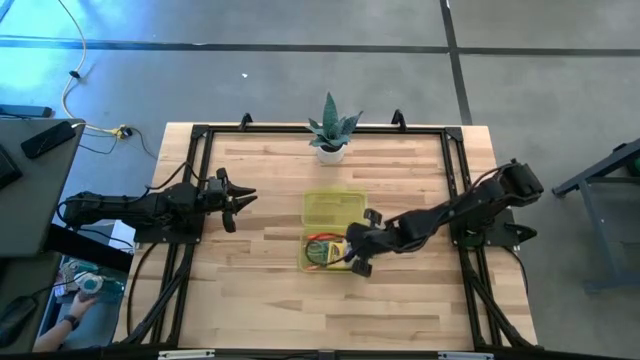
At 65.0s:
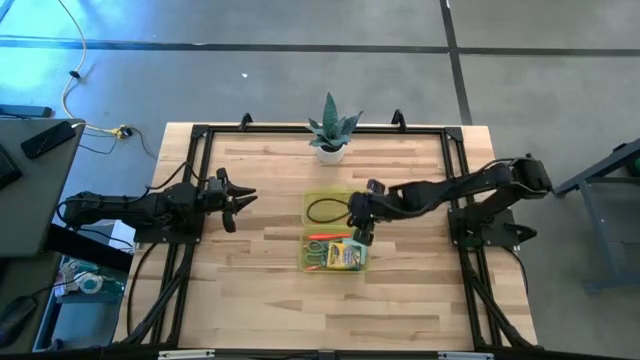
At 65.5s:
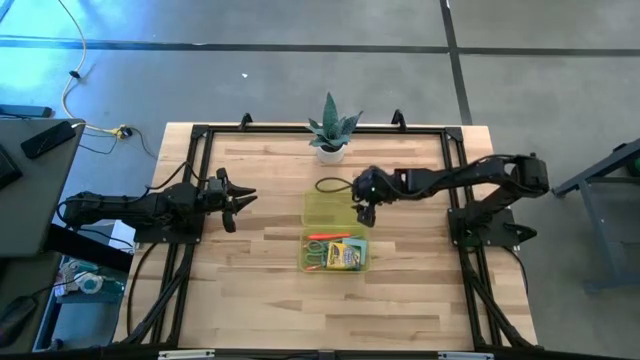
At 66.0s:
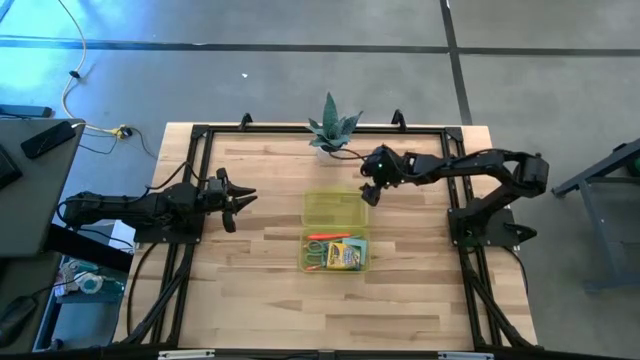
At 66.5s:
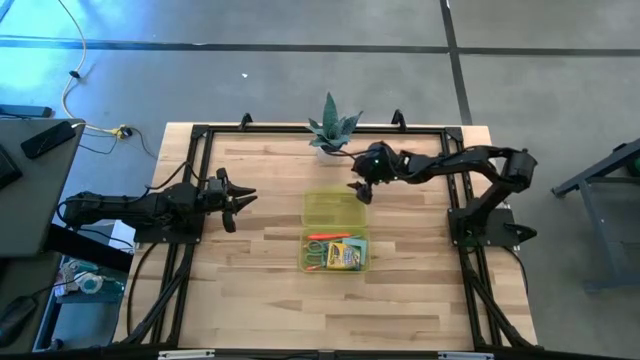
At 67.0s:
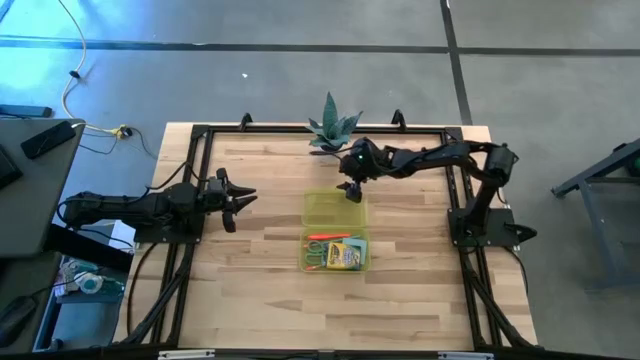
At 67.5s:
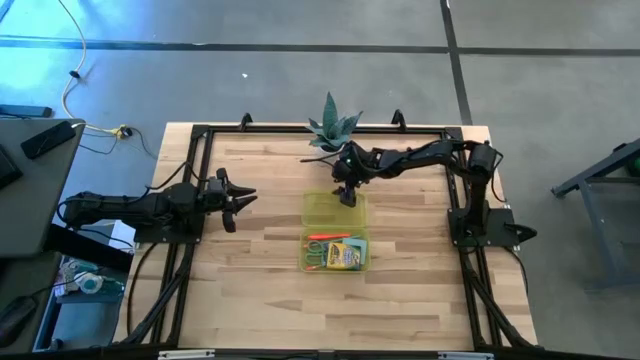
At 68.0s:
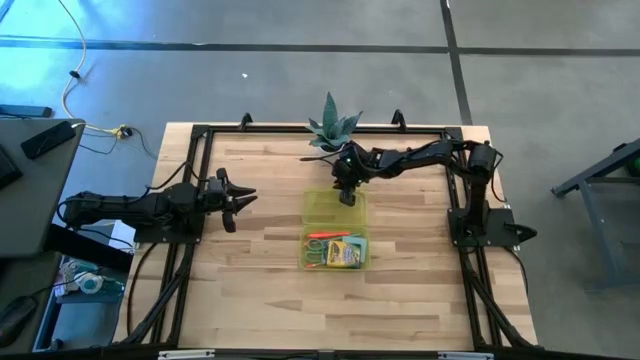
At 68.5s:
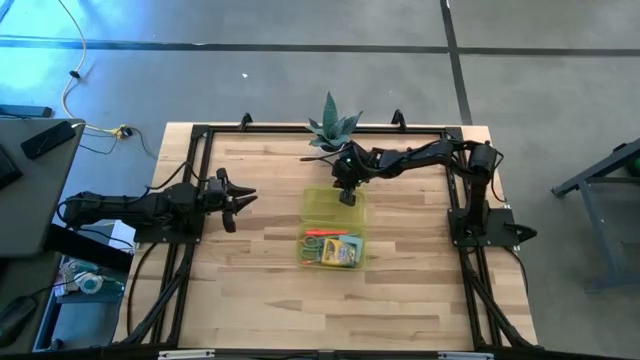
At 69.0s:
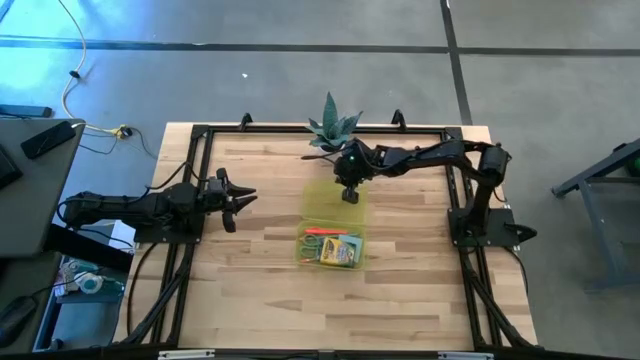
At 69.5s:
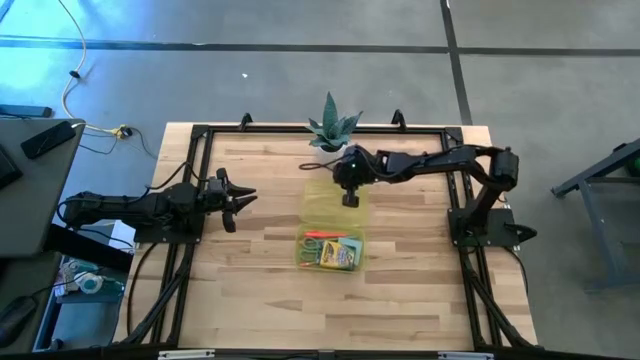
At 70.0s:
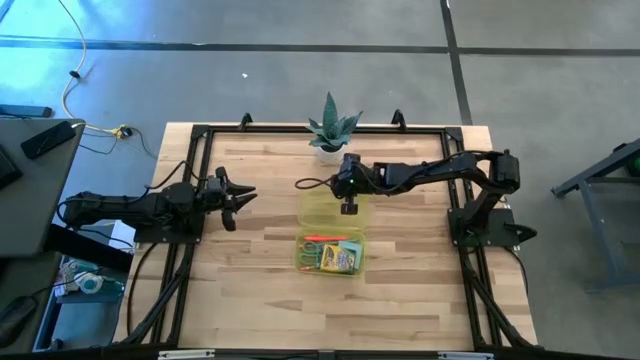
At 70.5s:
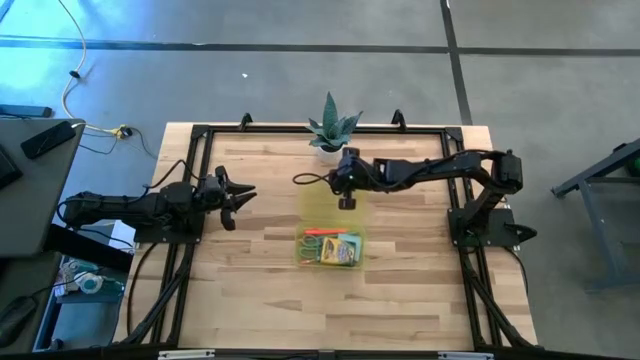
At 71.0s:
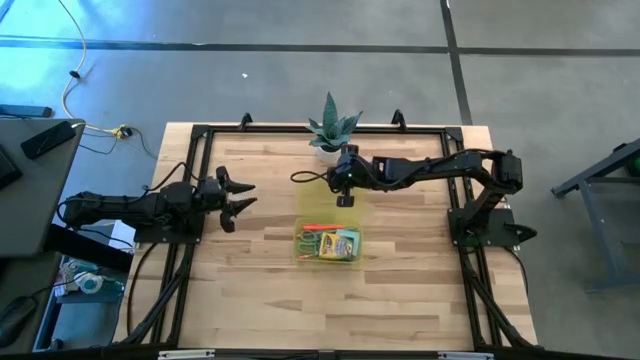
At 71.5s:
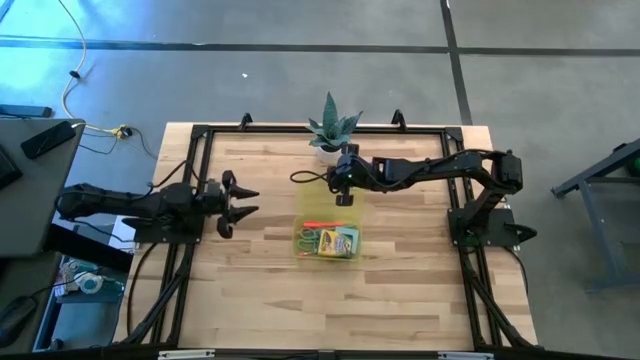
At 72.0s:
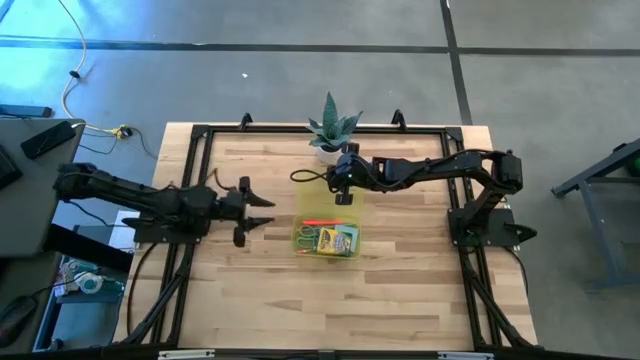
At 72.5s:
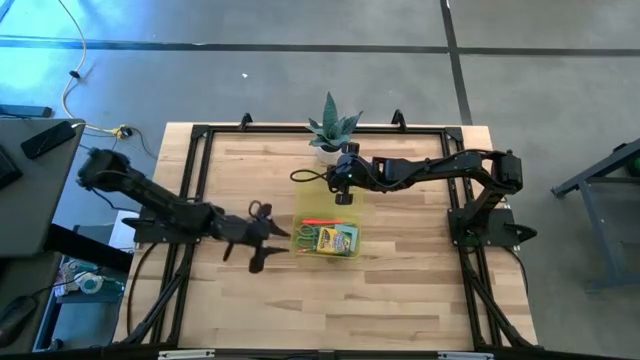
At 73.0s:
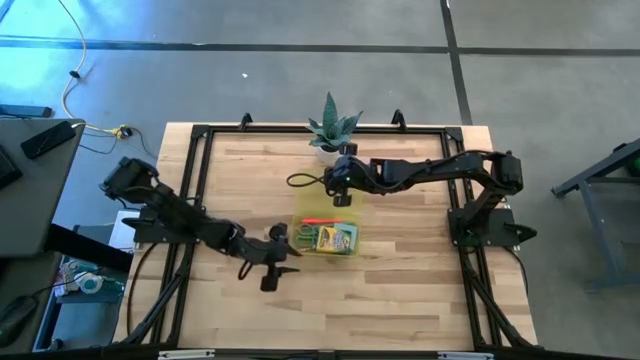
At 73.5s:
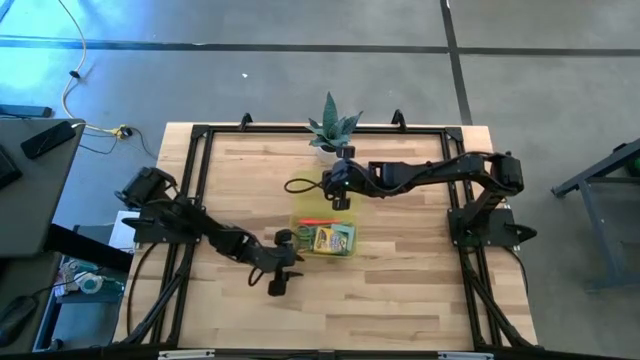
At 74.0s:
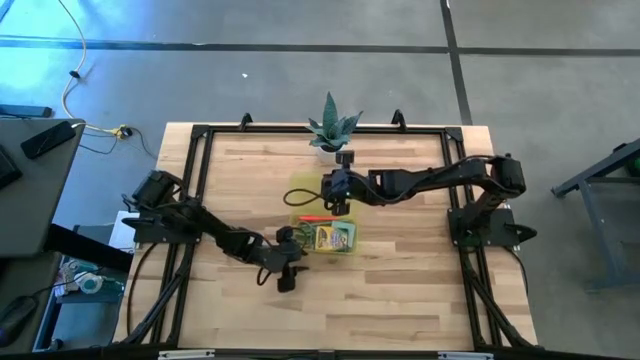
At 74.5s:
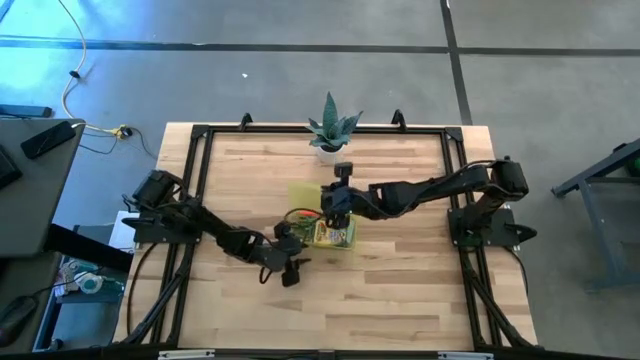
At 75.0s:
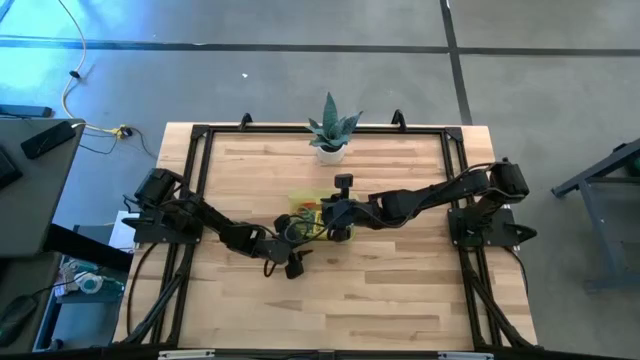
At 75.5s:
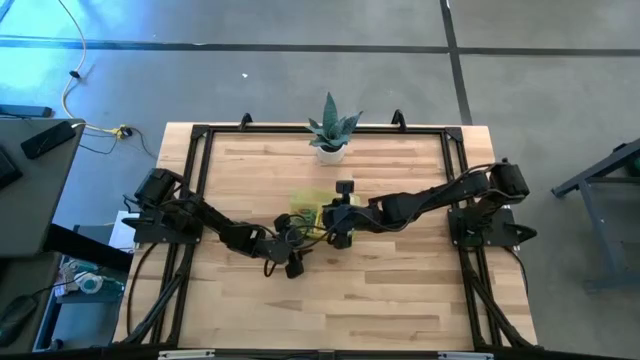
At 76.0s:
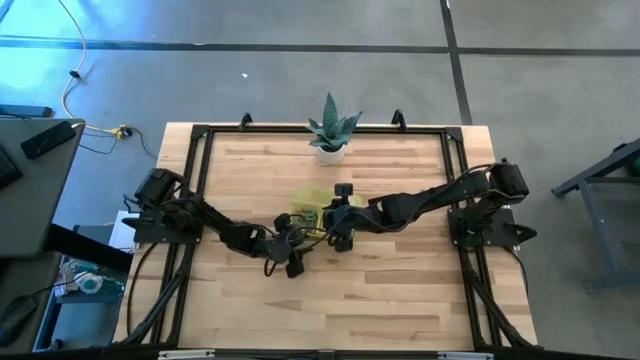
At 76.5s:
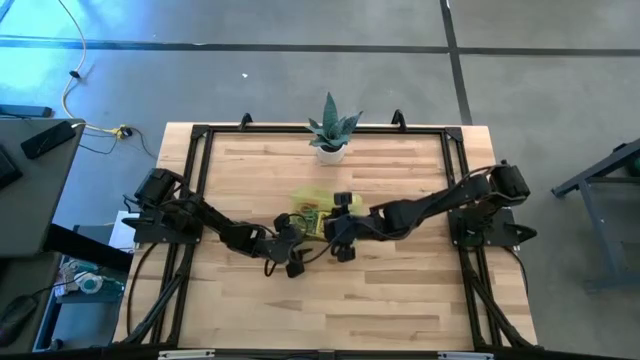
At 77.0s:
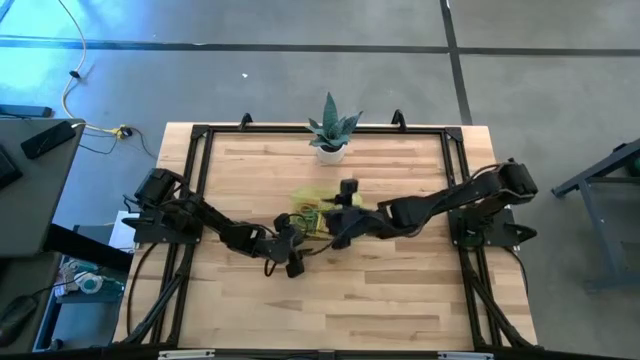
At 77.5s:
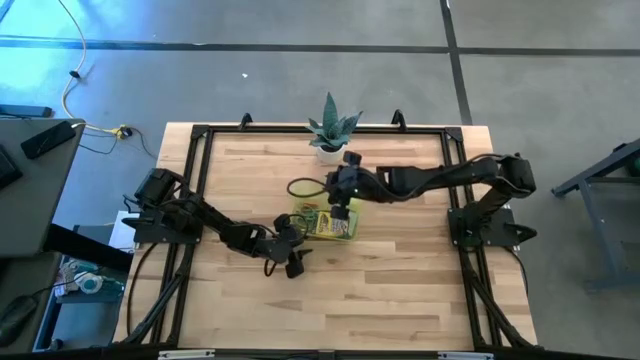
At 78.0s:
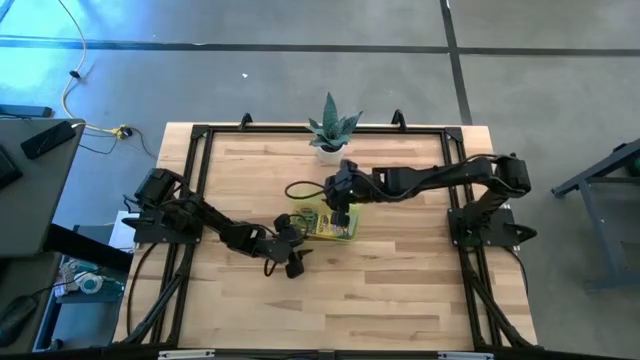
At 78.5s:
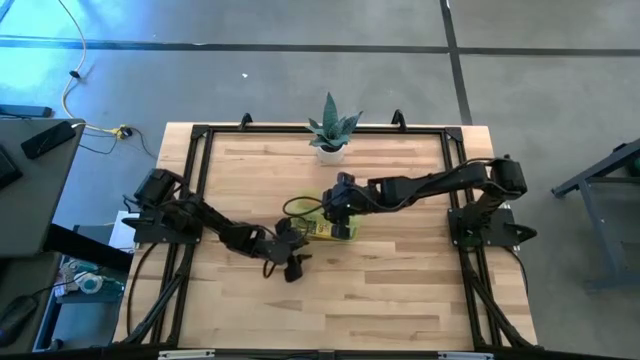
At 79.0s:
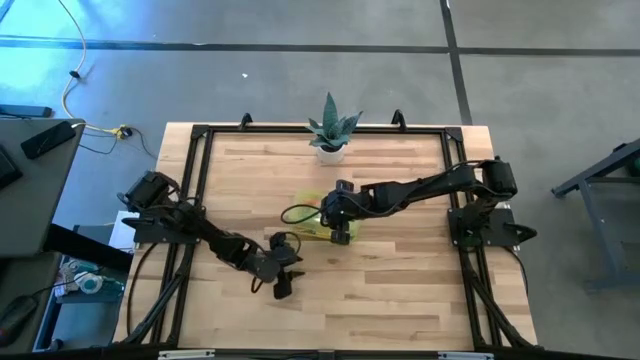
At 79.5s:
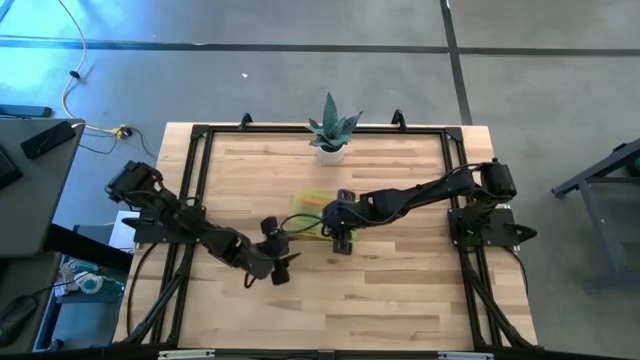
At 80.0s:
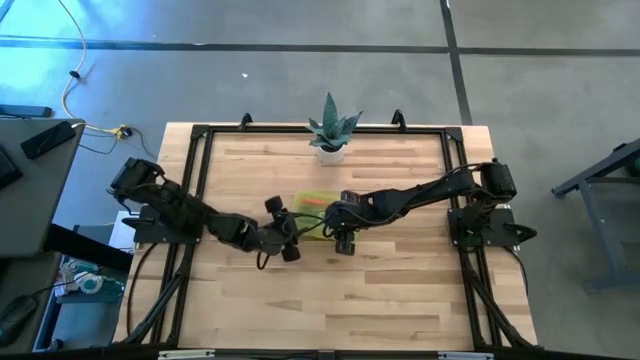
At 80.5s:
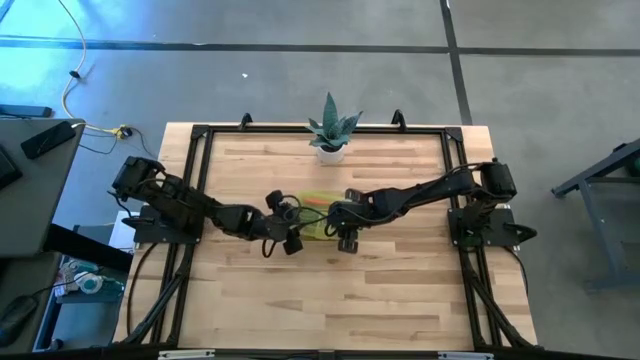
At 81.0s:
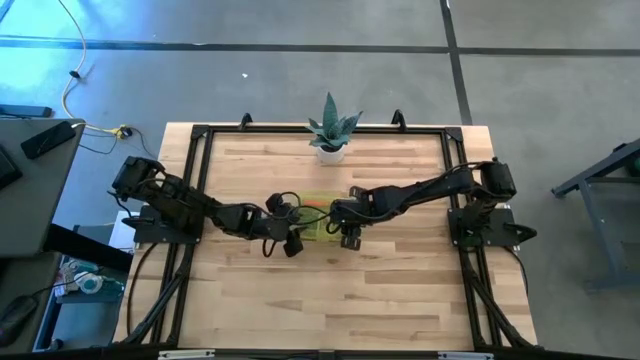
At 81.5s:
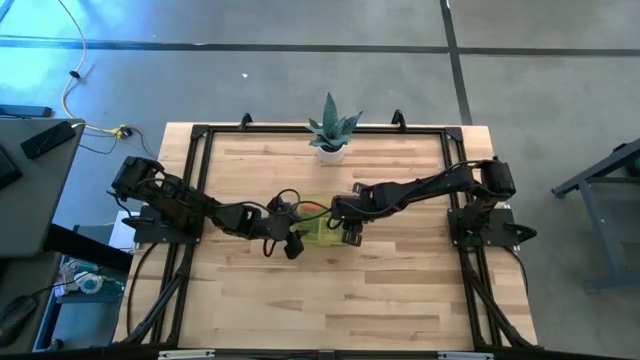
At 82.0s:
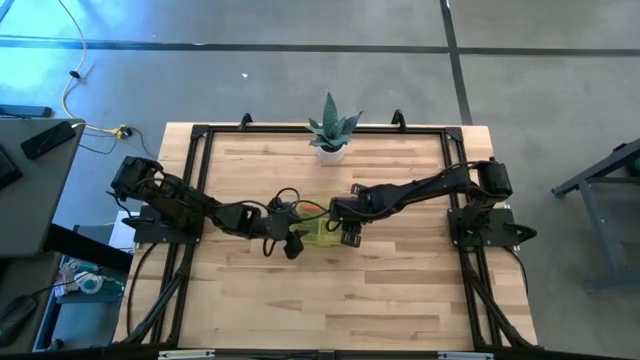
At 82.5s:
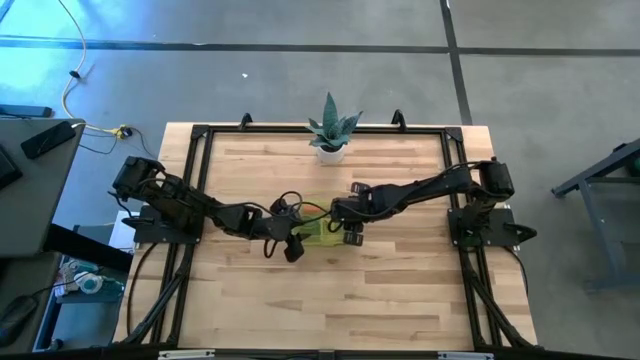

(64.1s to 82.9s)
Task: Pack school essentials
Close the yellow supply box

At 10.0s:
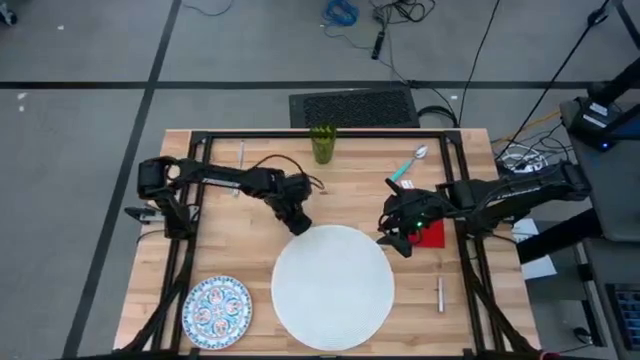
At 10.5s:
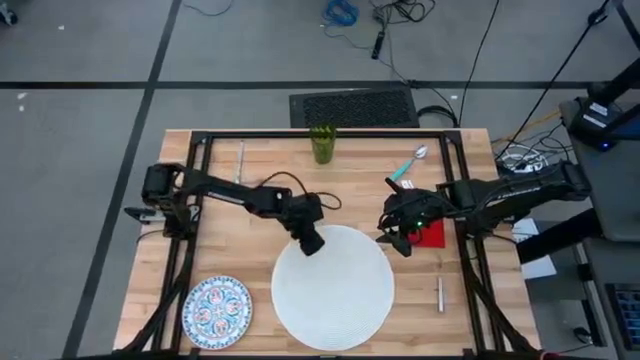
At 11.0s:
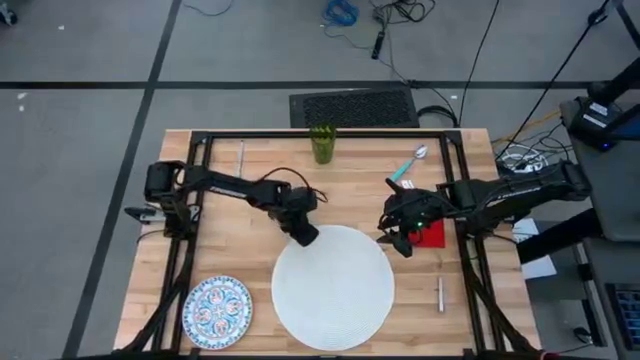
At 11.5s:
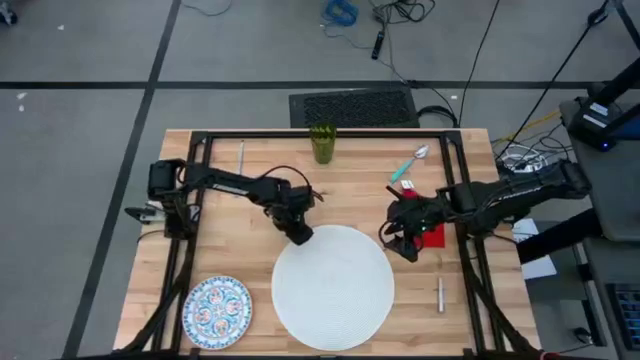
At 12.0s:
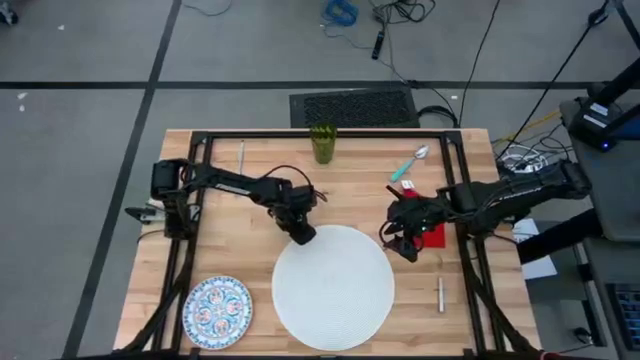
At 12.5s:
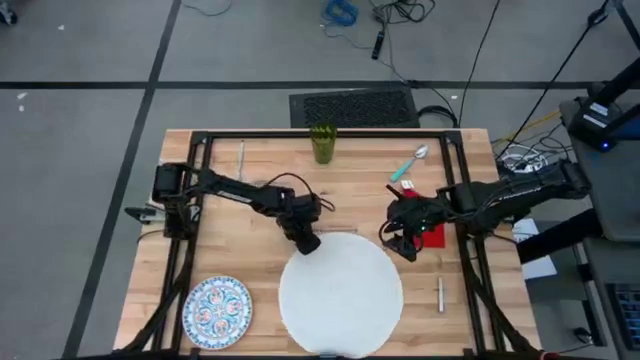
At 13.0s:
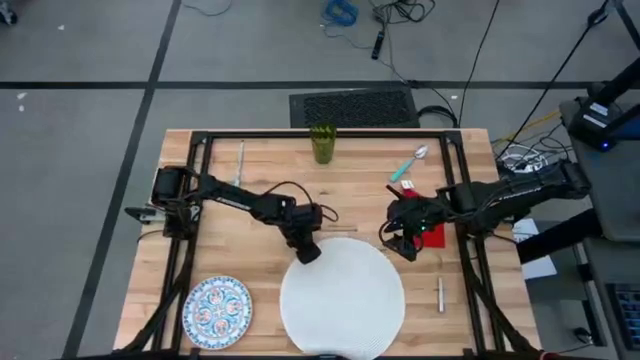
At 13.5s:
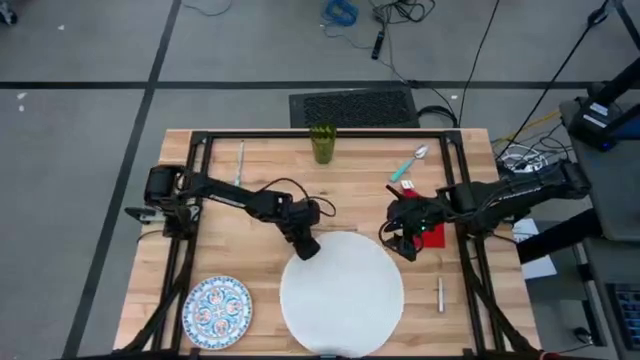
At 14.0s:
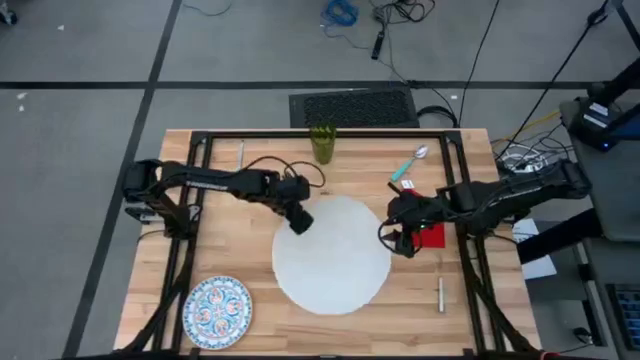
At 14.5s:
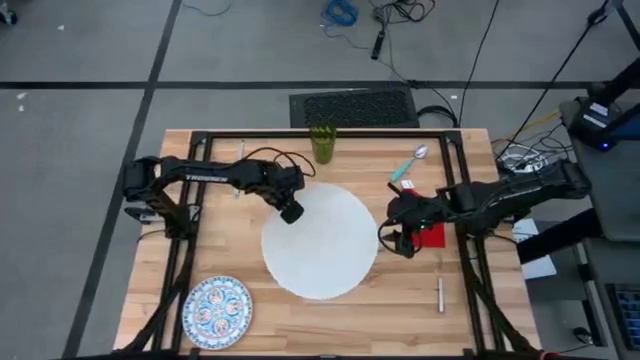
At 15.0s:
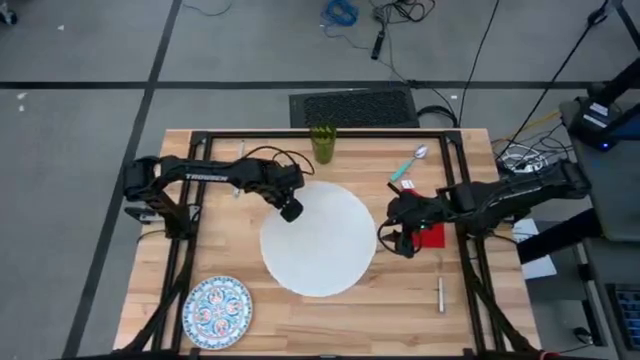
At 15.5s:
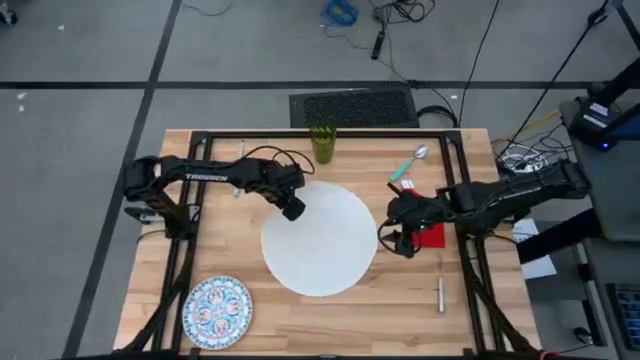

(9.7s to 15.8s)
Task: Set table place
Move the white placemat to the center of the table
